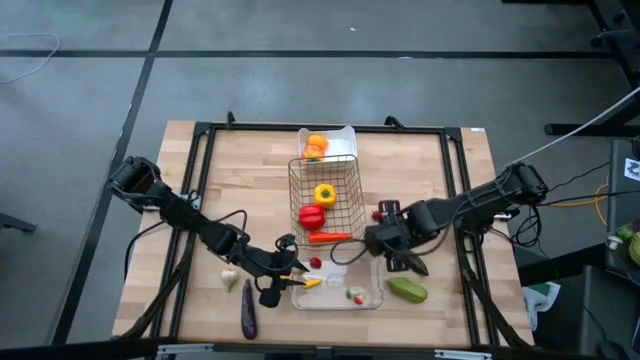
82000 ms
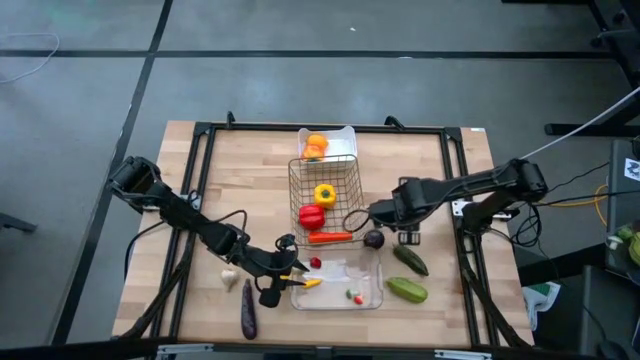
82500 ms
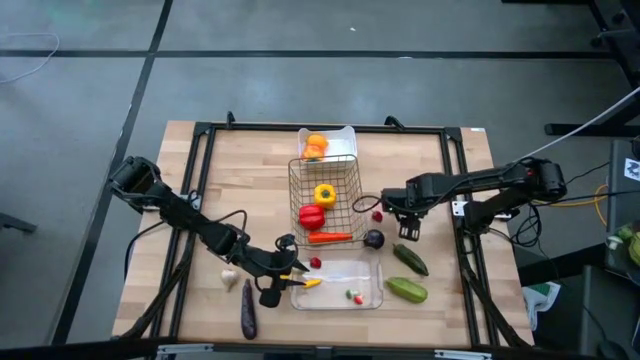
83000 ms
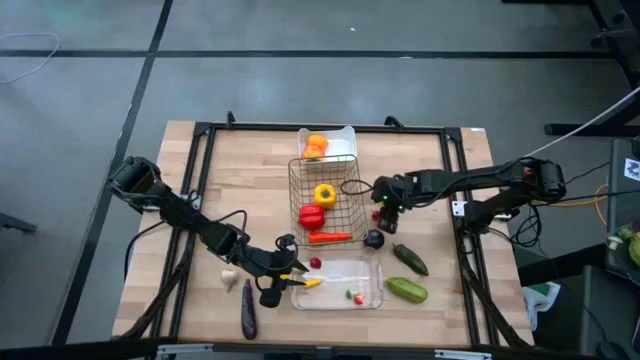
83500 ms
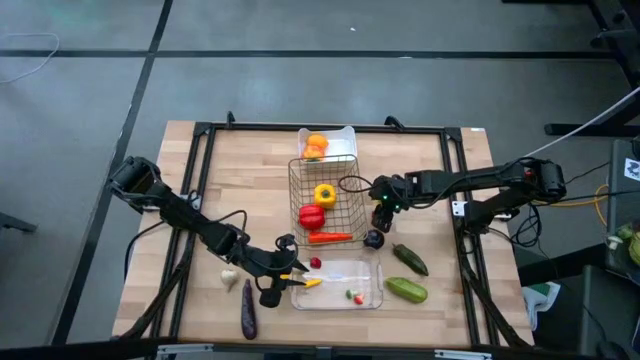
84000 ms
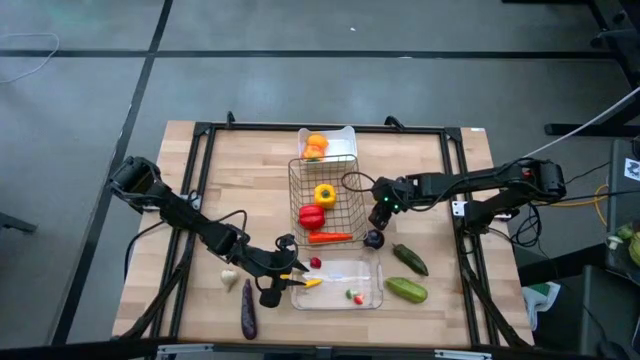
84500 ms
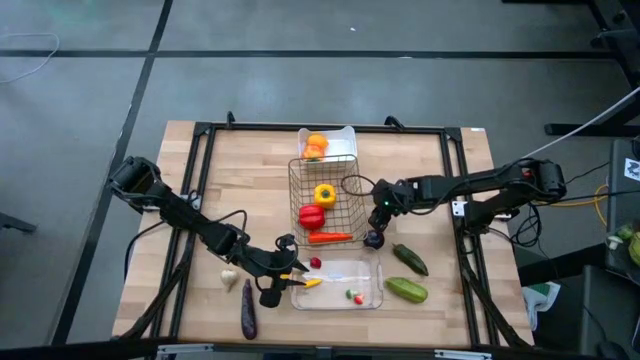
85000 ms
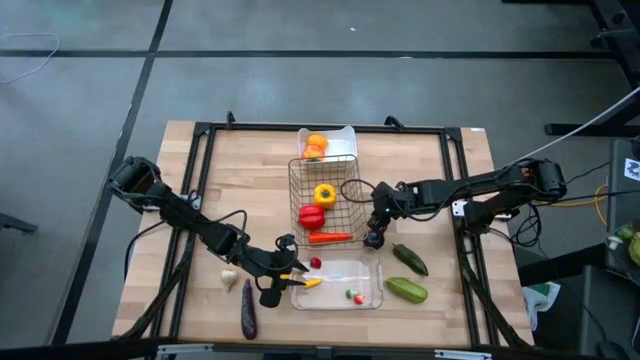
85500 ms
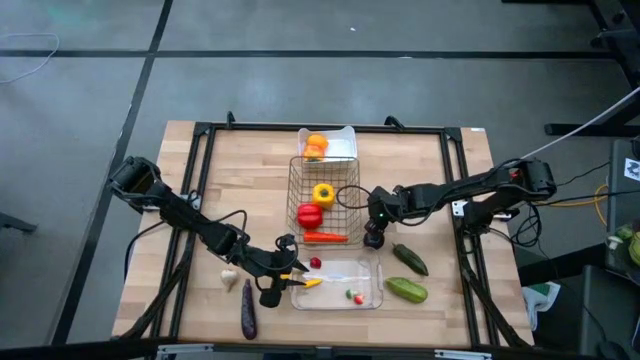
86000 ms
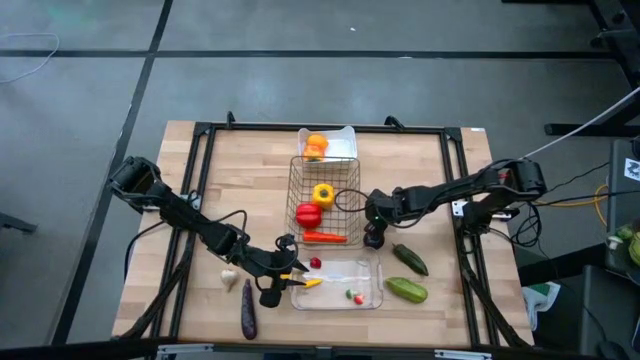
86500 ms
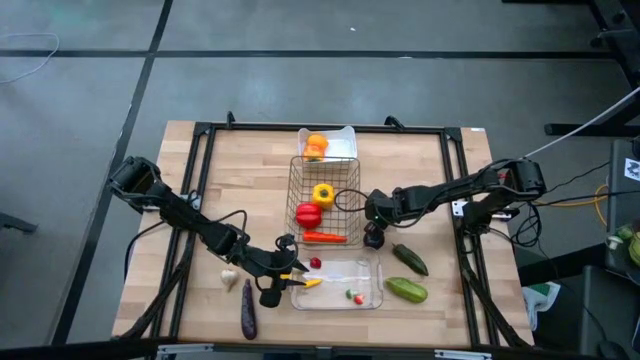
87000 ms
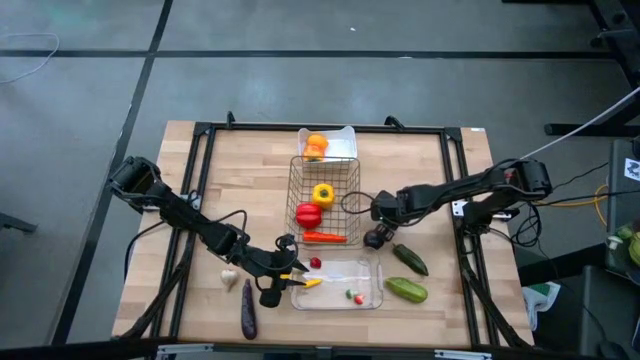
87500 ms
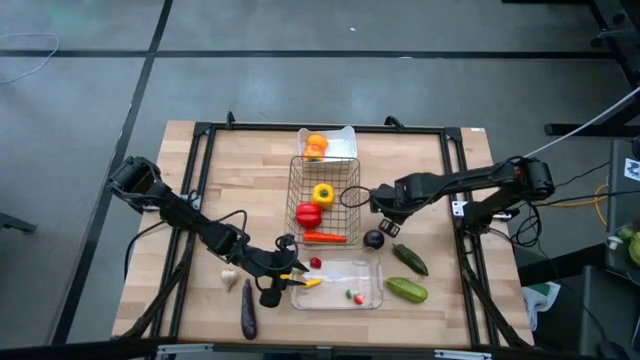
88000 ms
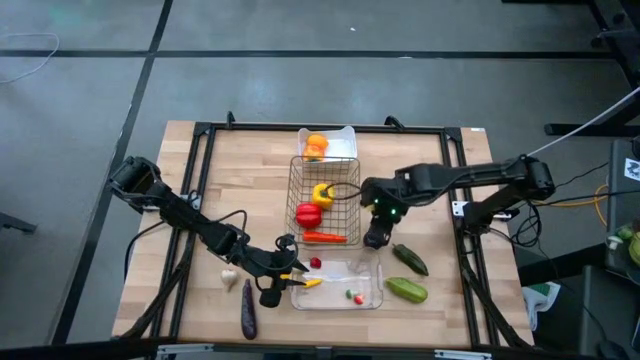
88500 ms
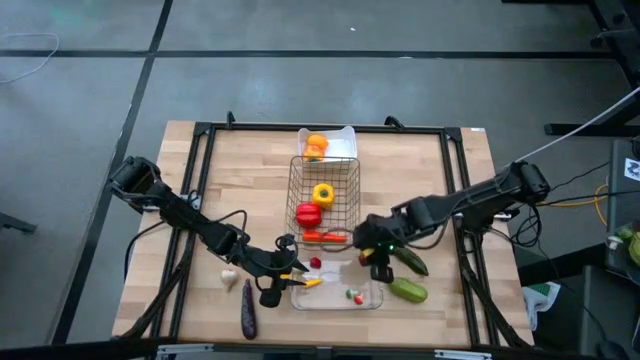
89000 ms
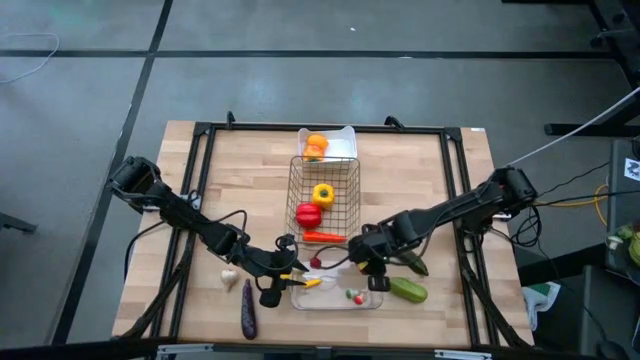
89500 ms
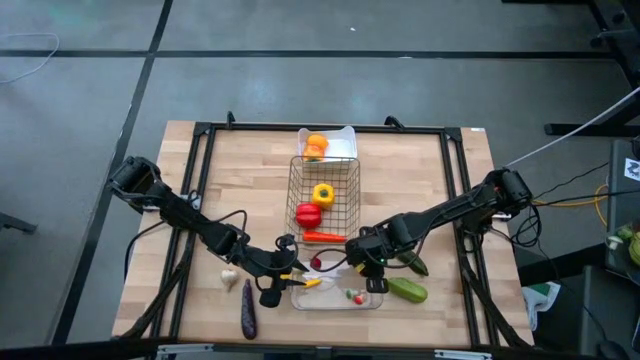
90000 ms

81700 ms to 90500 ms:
Task: Sort produce into baskets
Put the small red chili pepper into the transparent bin

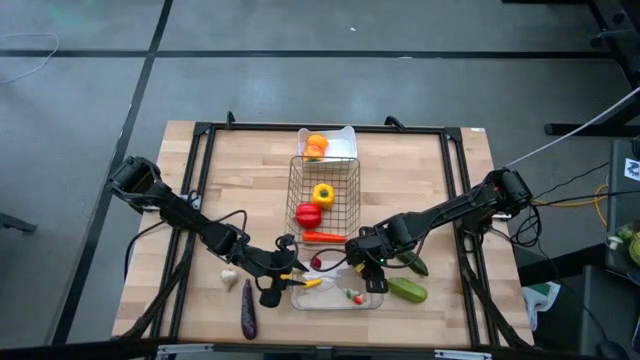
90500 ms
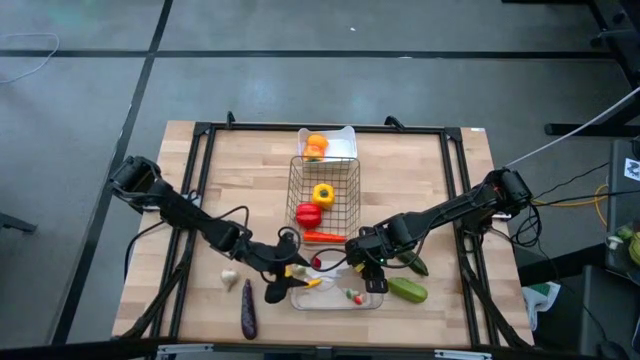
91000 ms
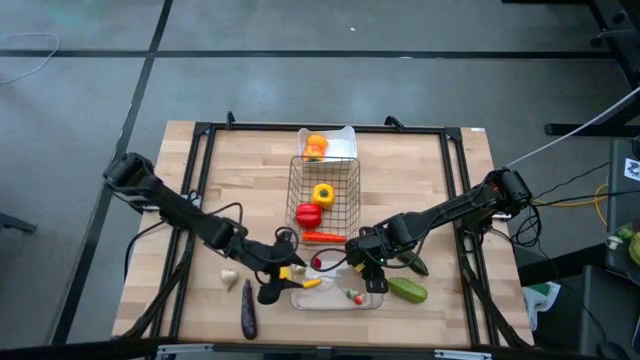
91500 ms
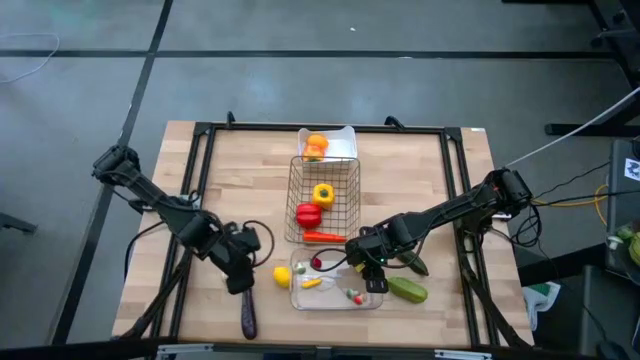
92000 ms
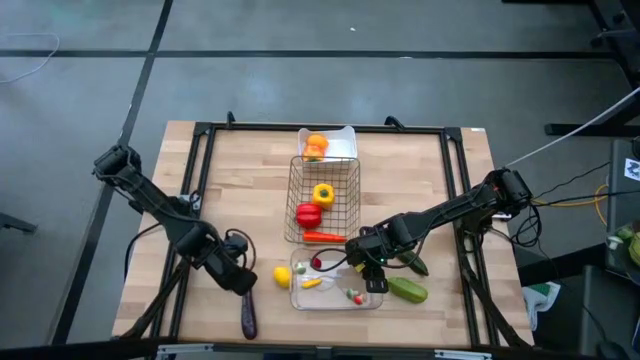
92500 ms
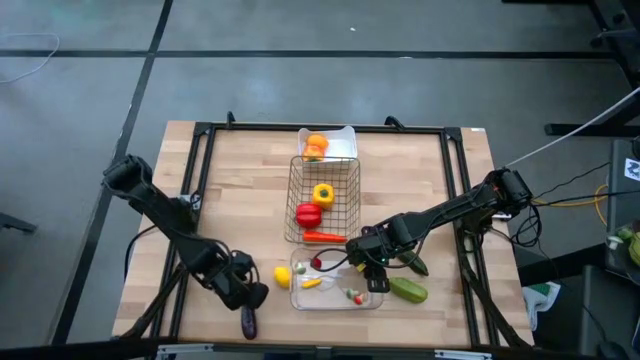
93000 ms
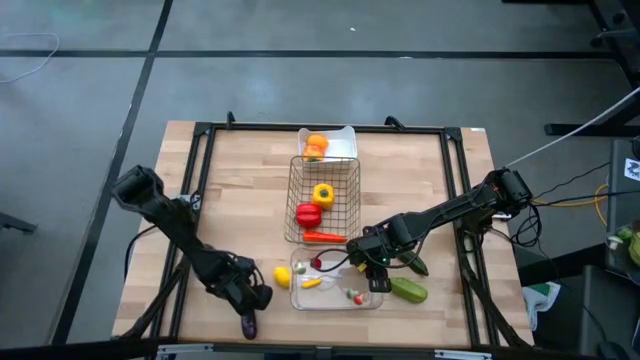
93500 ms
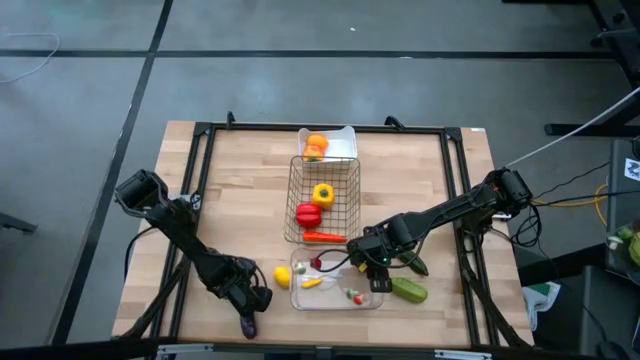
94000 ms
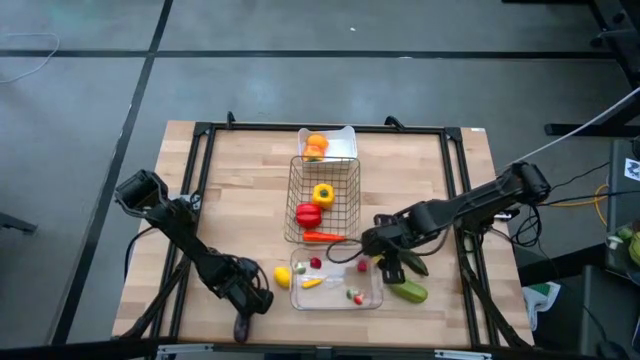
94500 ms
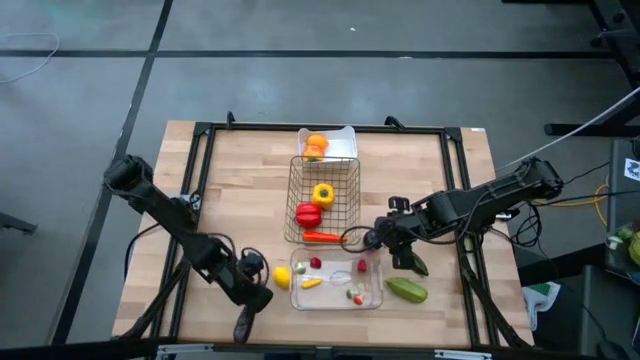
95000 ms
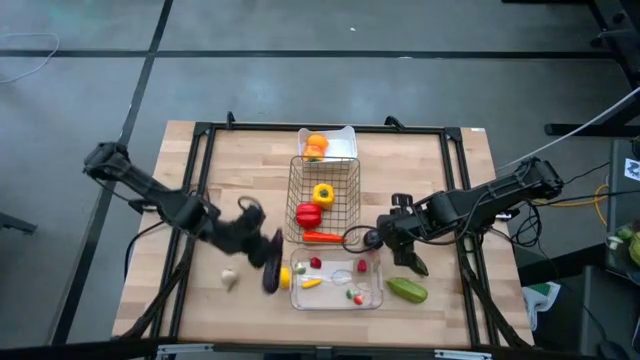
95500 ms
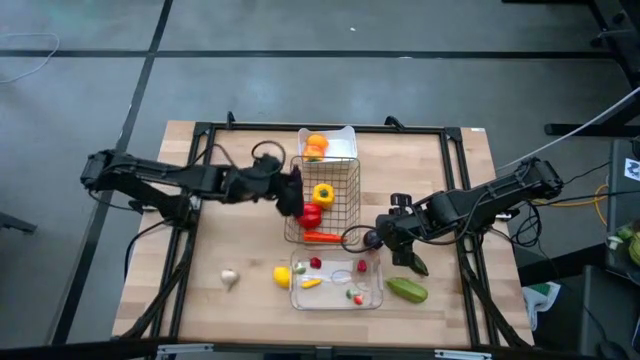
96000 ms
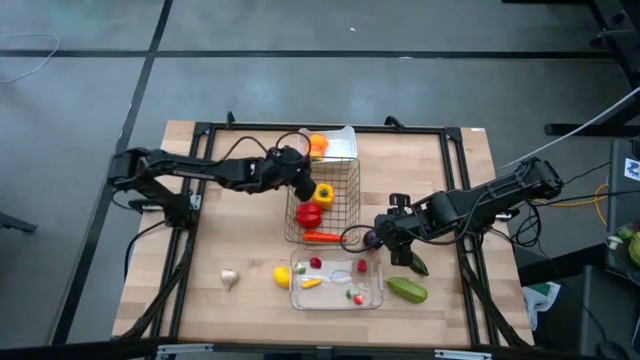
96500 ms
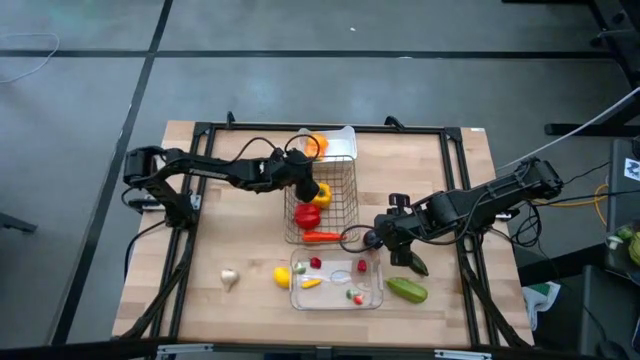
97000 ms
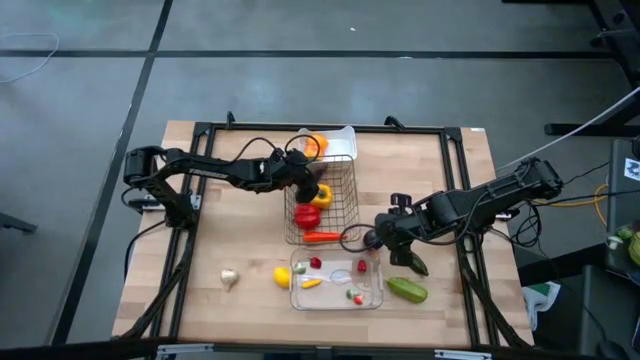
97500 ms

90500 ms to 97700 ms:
Put the eggplant into the wire basket

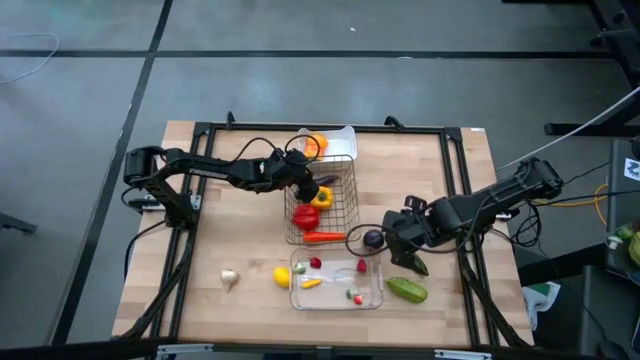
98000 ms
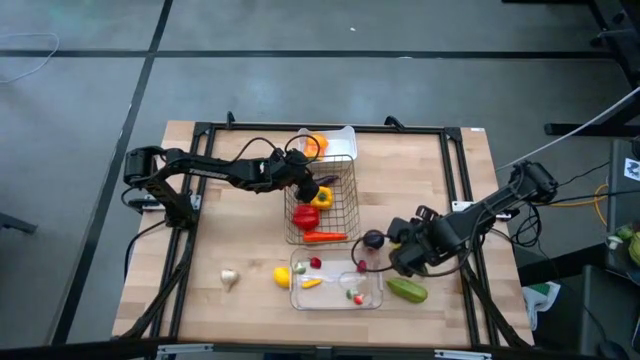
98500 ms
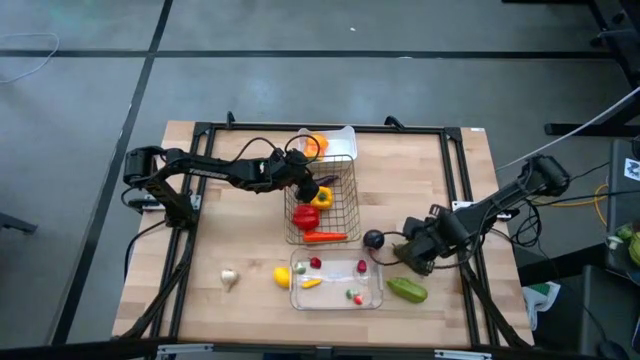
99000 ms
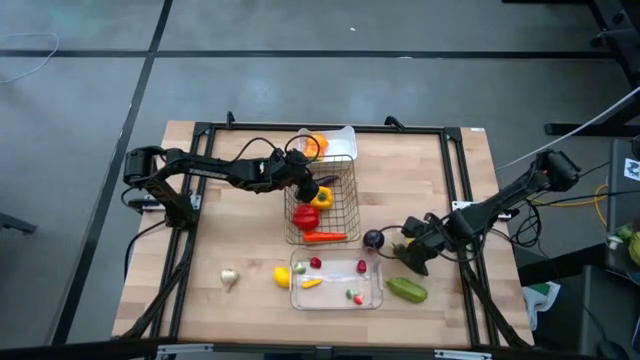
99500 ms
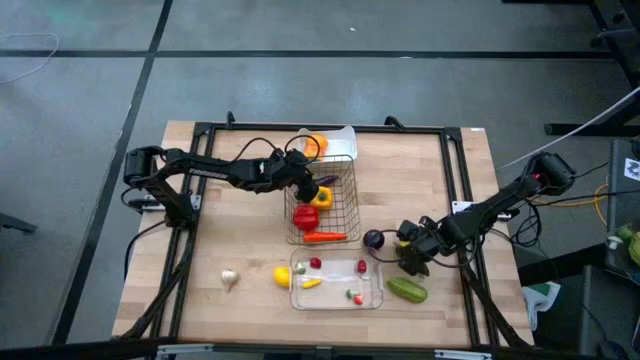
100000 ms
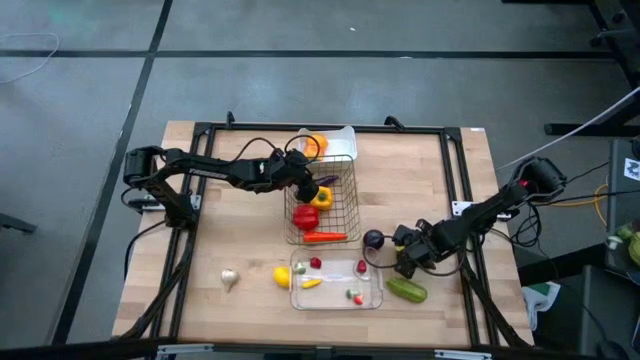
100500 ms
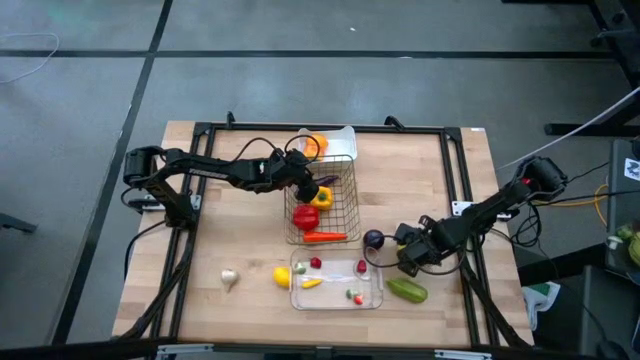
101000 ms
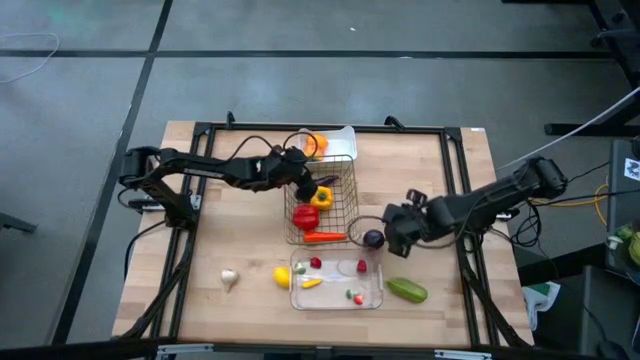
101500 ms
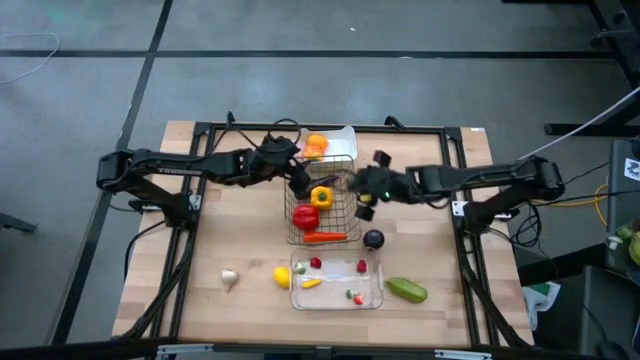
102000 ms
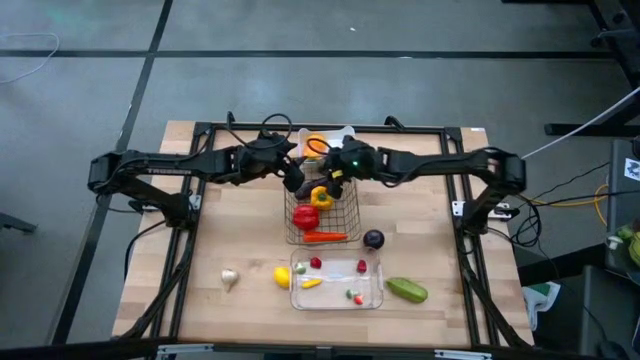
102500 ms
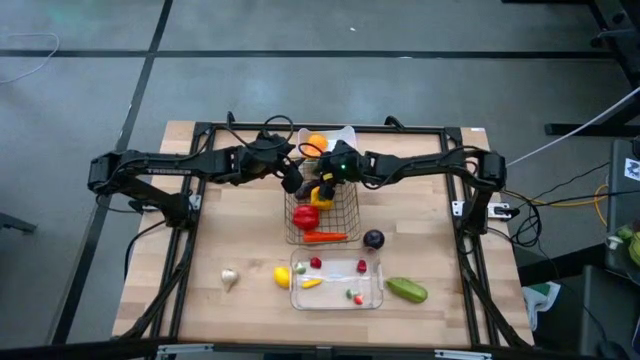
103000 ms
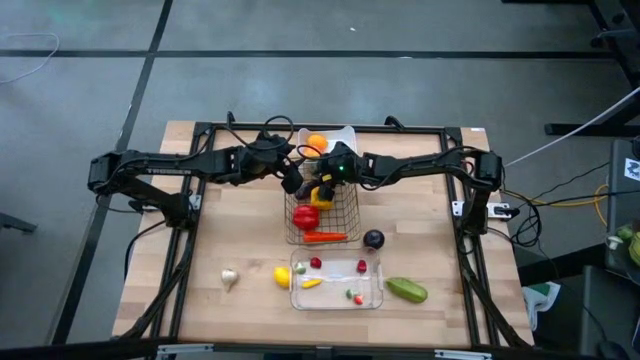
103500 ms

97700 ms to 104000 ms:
Put the green chili pepper into the wire basket
